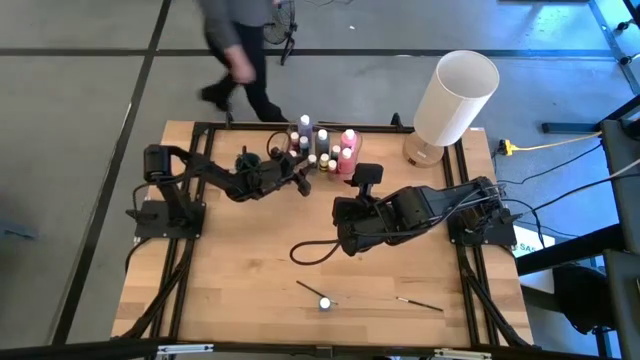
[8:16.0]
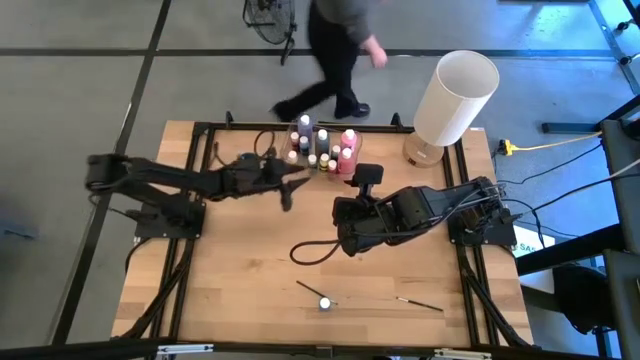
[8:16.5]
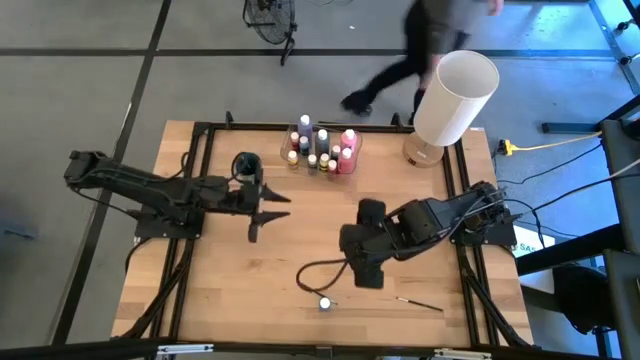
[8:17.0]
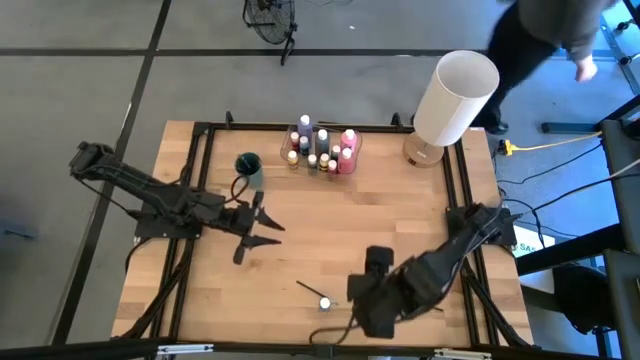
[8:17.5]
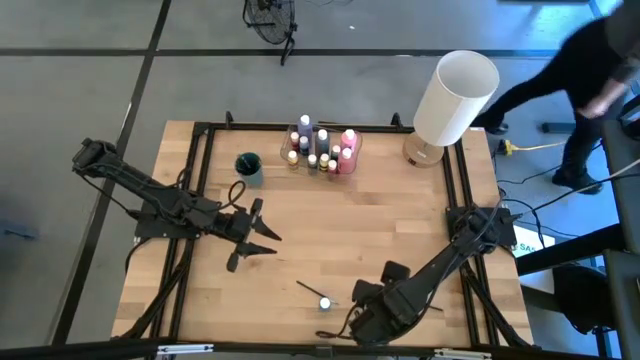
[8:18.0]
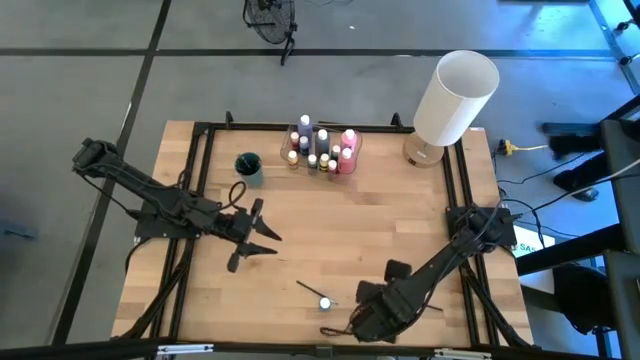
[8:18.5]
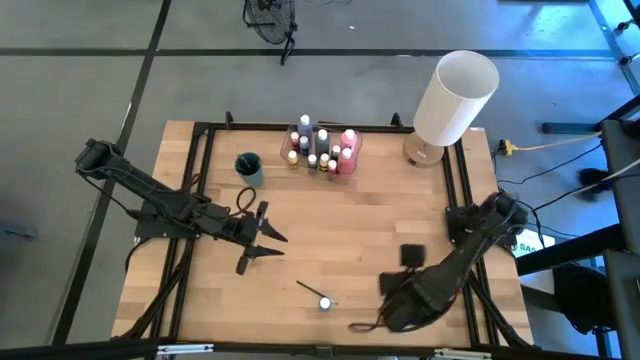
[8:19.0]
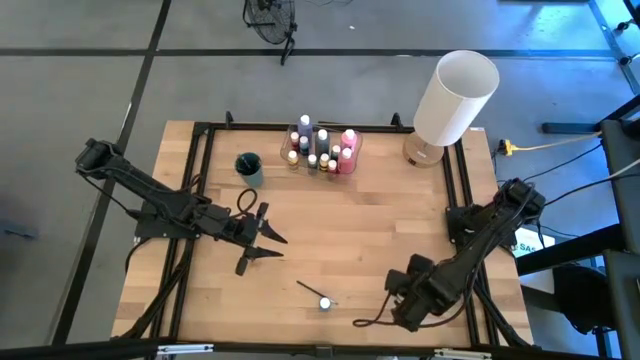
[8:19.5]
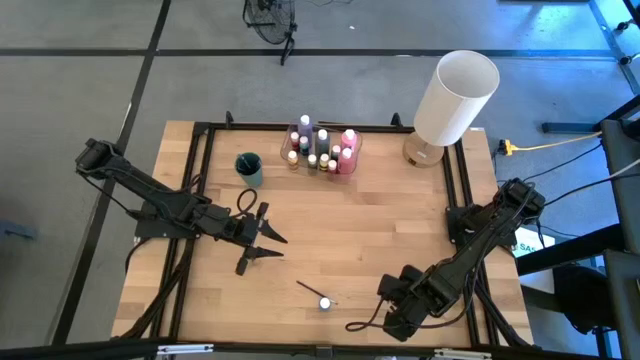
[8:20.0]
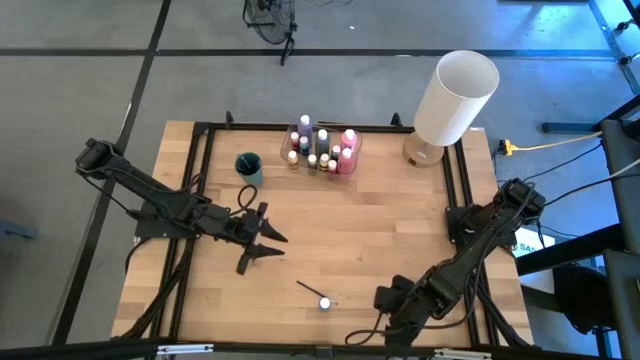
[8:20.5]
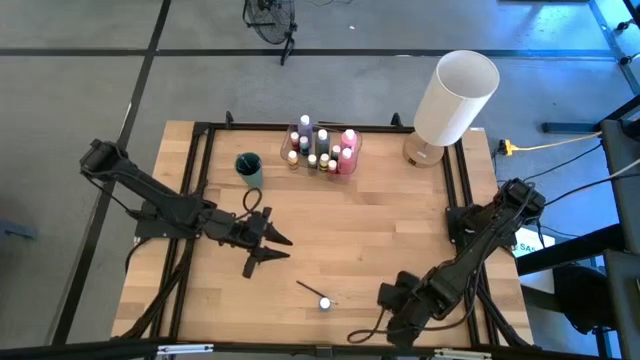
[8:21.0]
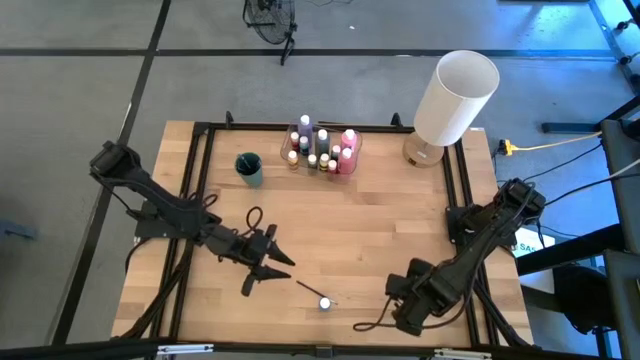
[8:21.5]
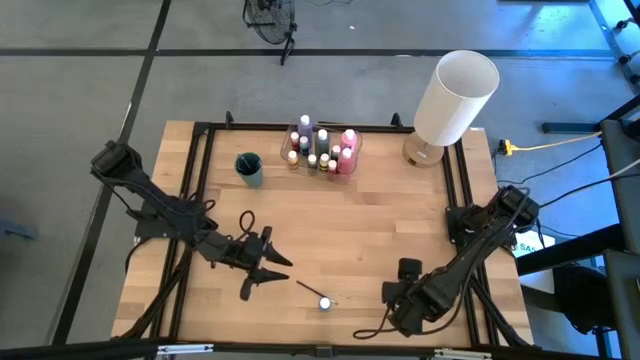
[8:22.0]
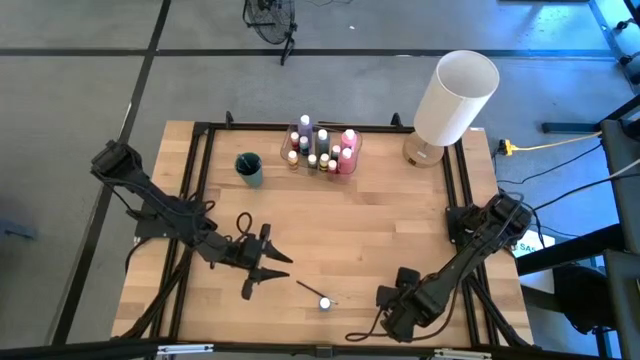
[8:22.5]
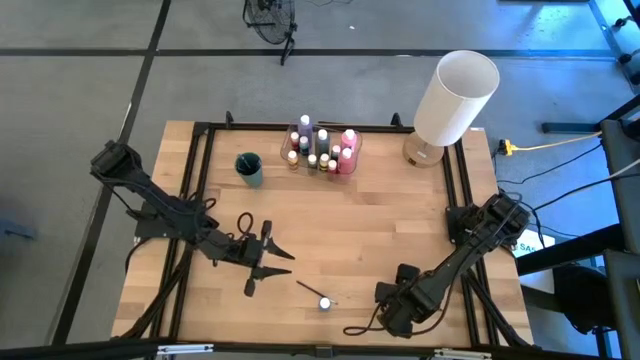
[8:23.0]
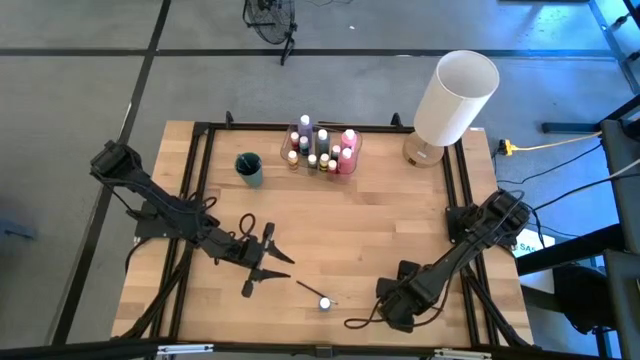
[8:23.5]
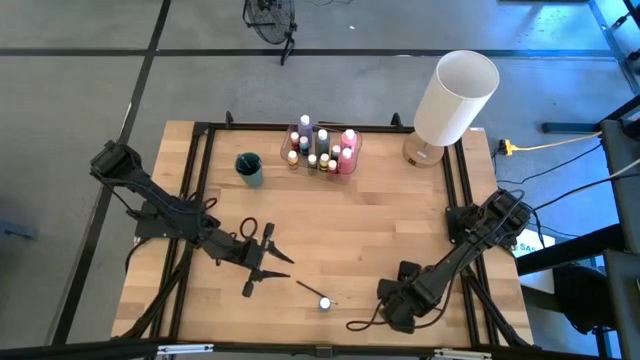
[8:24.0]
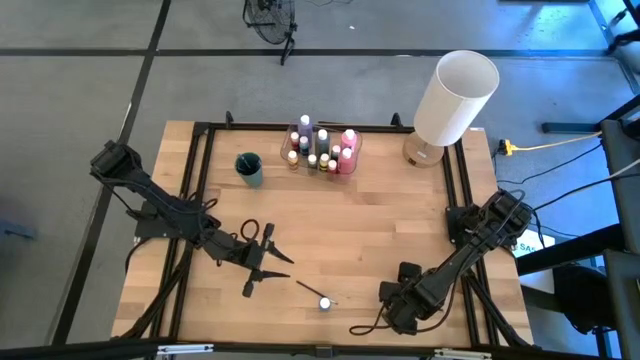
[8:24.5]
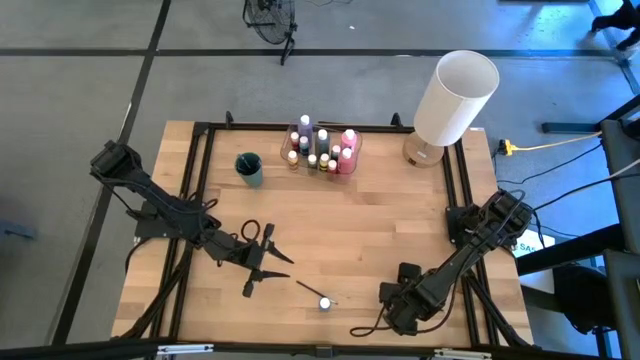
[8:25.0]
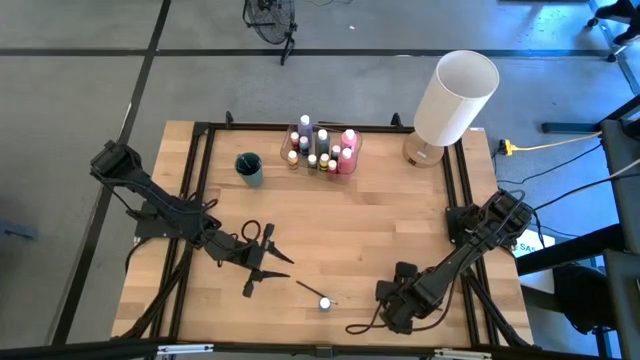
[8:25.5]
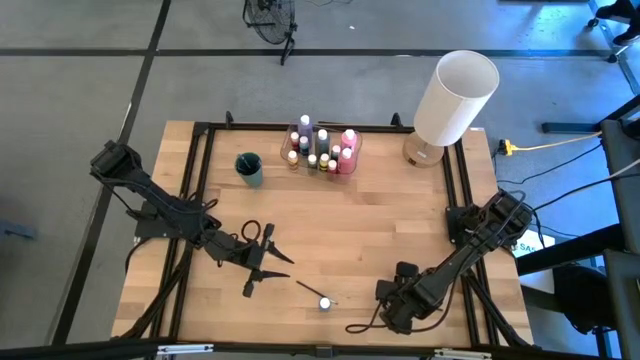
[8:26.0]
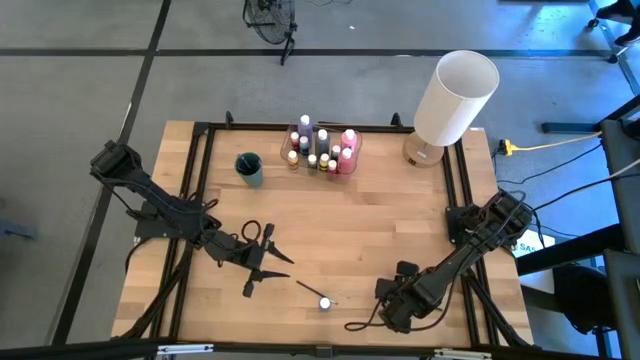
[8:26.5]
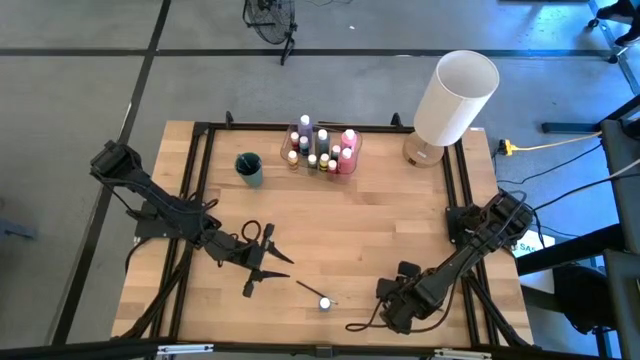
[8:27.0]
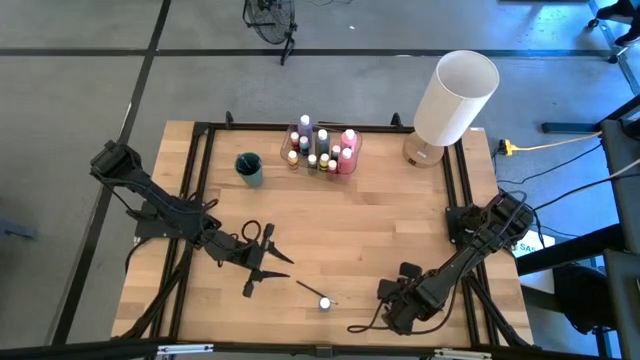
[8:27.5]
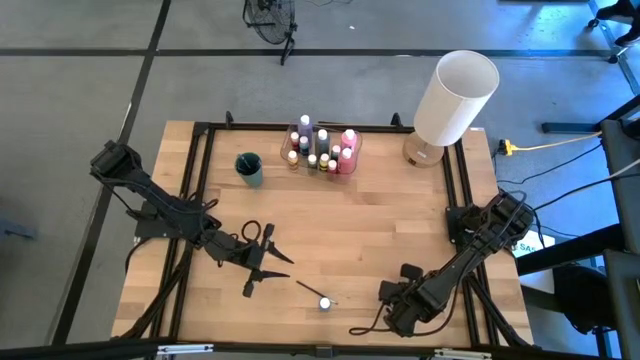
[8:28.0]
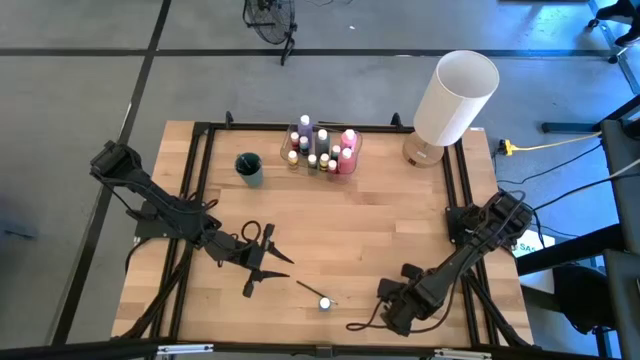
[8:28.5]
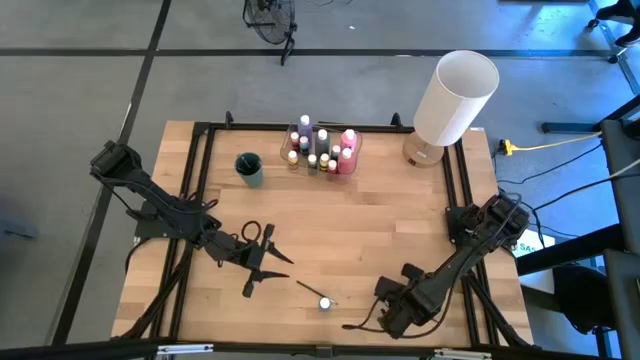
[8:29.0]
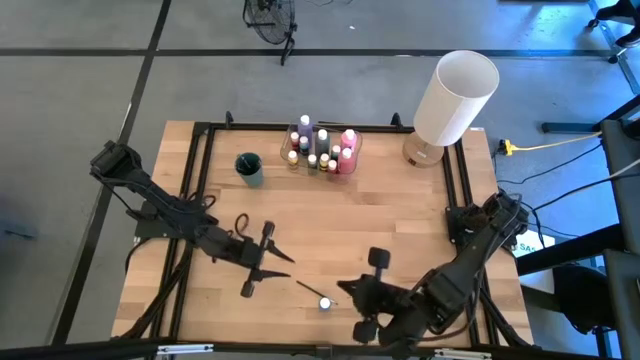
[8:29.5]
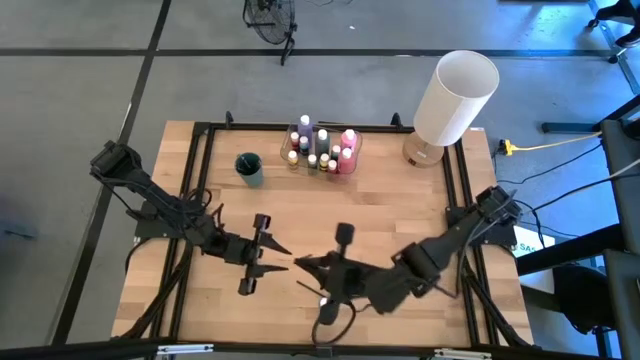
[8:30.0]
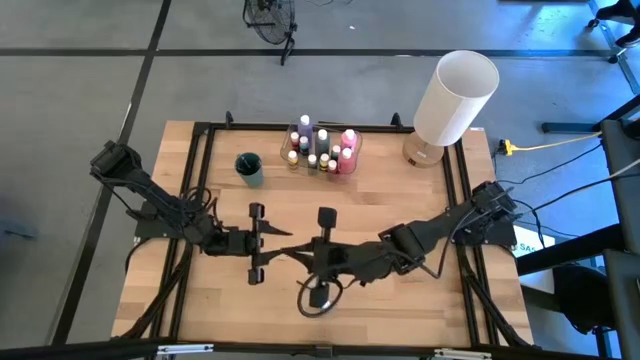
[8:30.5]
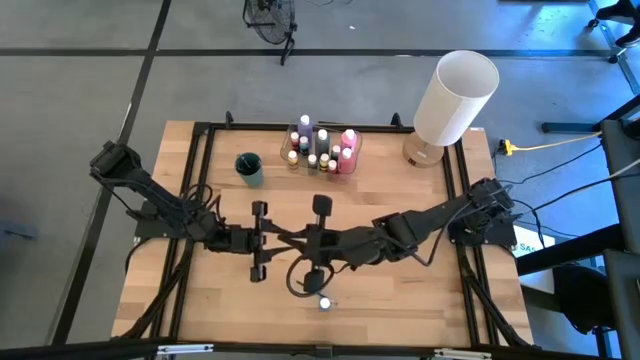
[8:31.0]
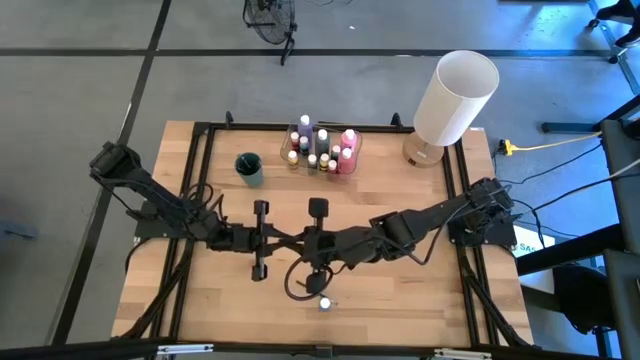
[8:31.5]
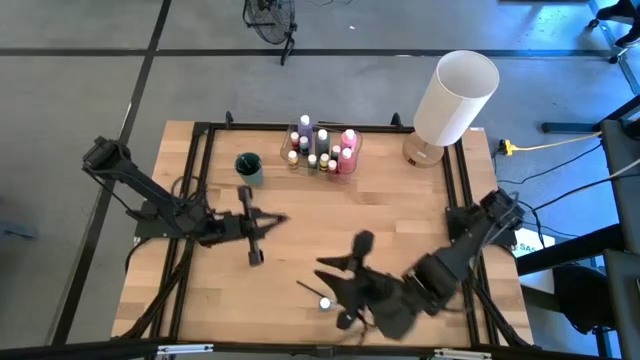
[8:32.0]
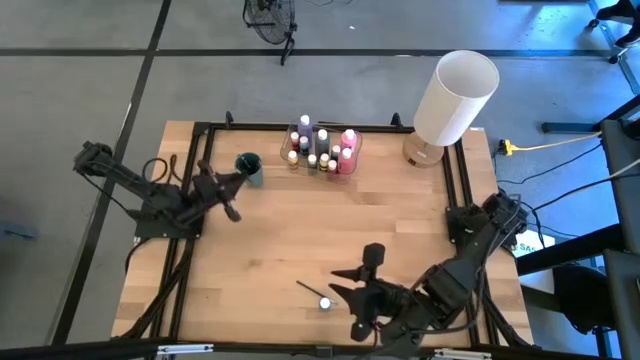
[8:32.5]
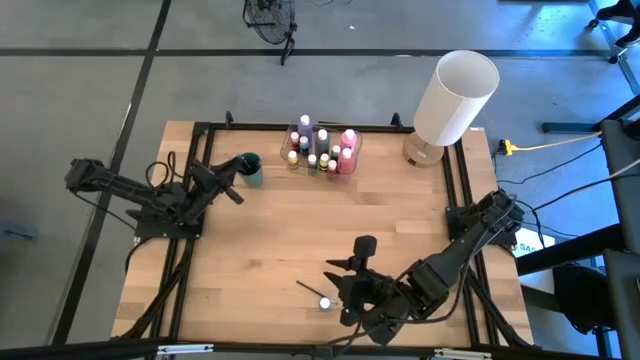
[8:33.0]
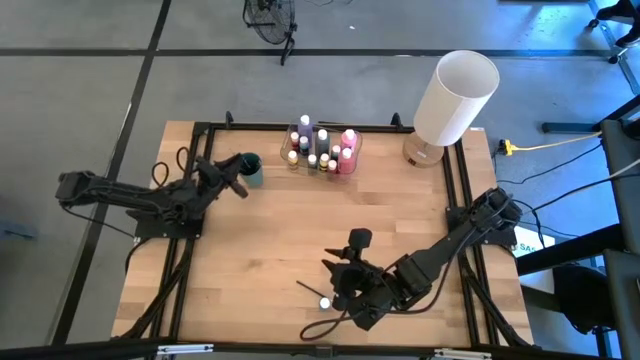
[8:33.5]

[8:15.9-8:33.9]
Task: Pick & Place Paint Supplies
Put the silver paint brush into the green cup

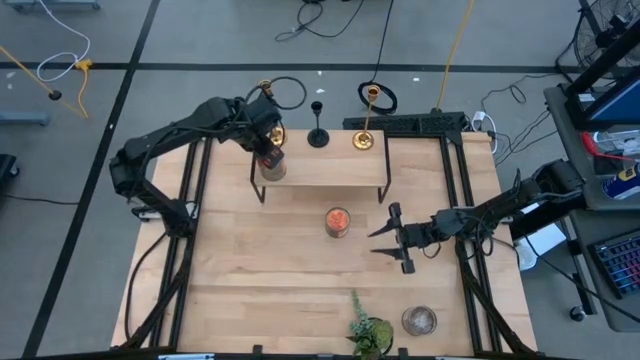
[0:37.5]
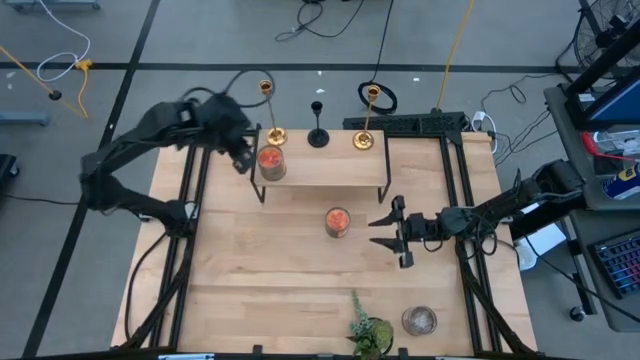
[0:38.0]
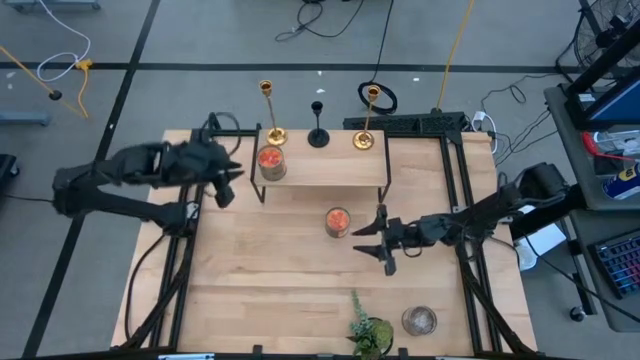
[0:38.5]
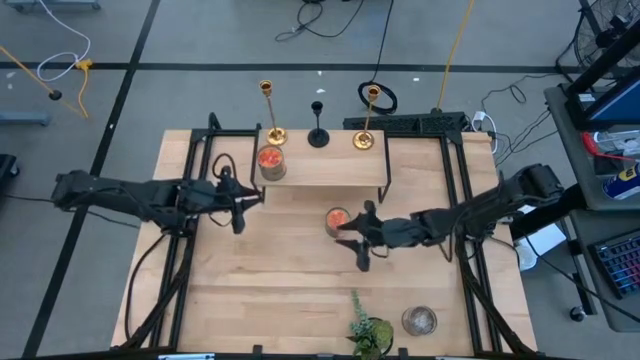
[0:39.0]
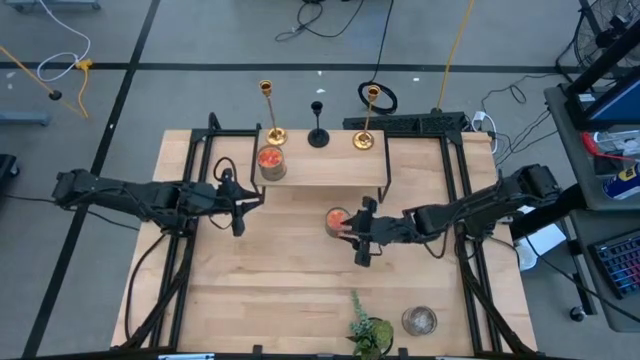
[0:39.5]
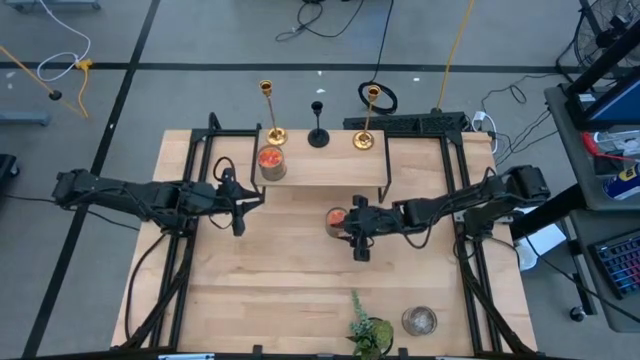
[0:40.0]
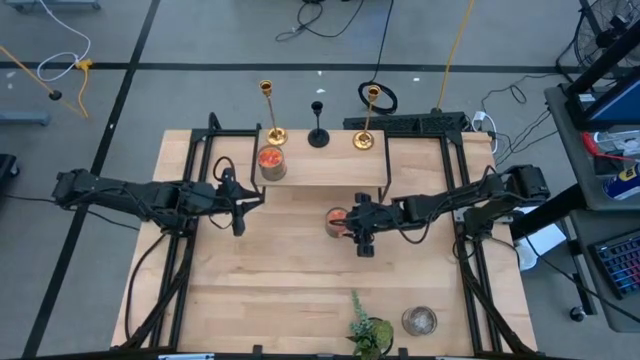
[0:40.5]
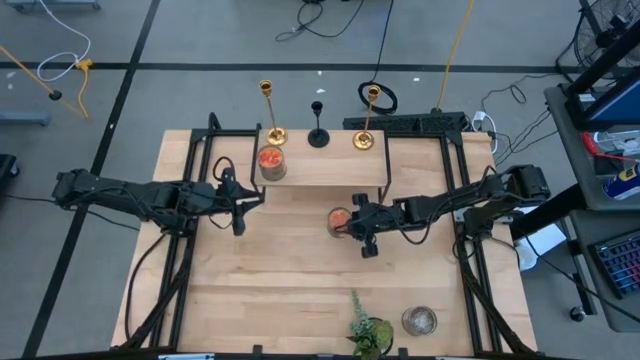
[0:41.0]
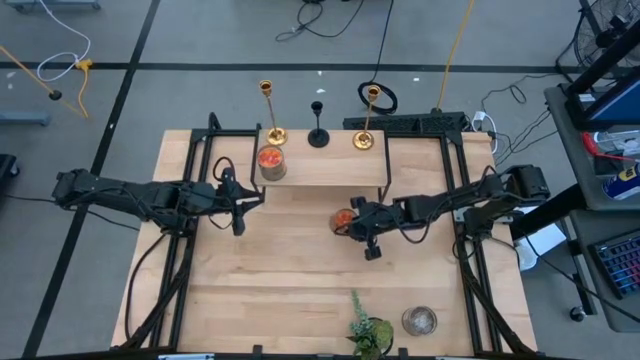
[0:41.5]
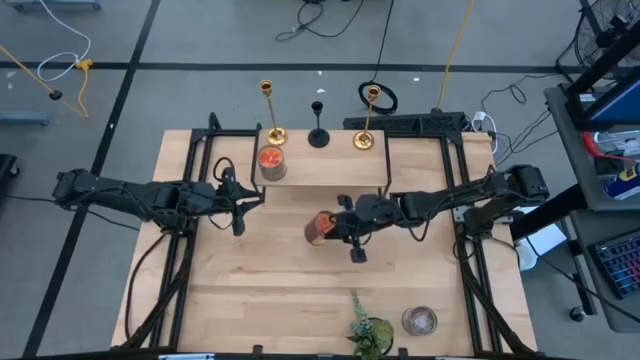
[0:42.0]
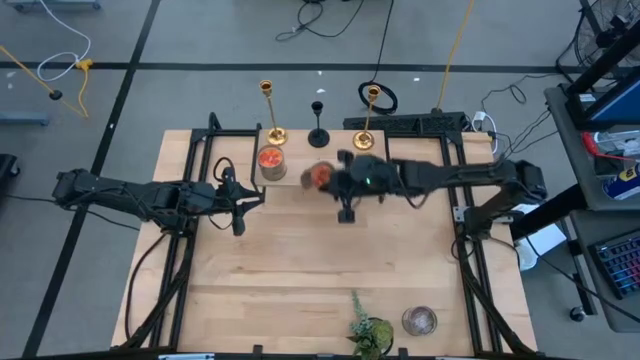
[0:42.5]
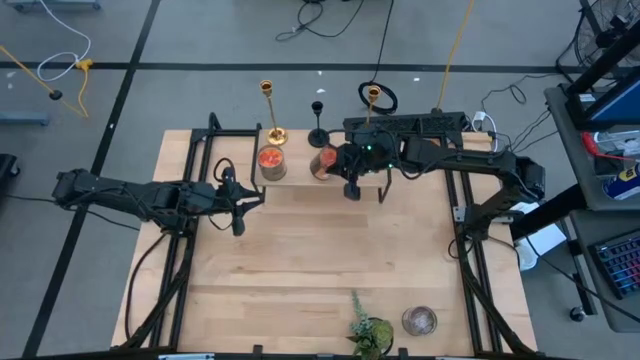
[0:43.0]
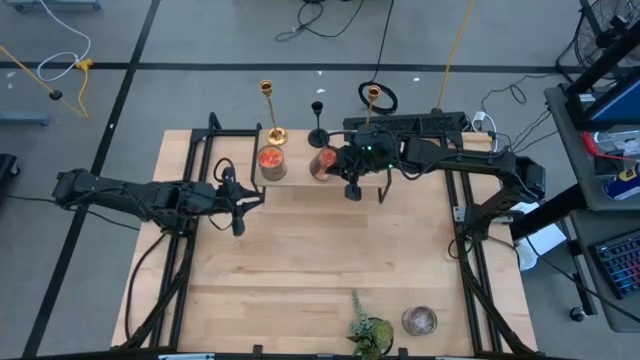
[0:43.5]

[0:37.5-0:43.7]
Task: Pick & Place candle stick holders
Put the orange scented candle on the shelf aligned with the other orange scented candle
